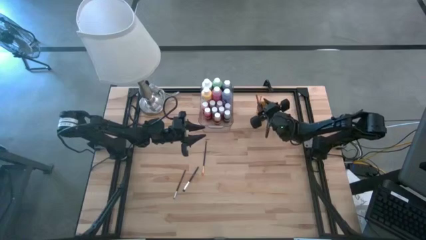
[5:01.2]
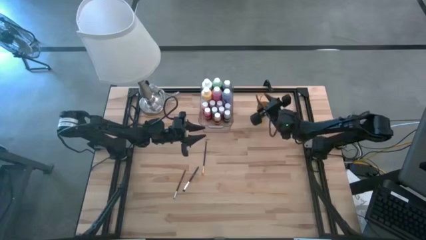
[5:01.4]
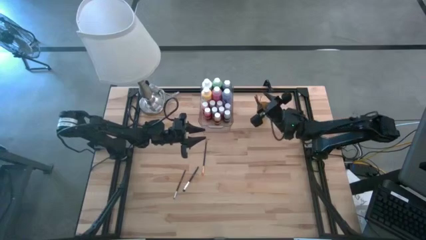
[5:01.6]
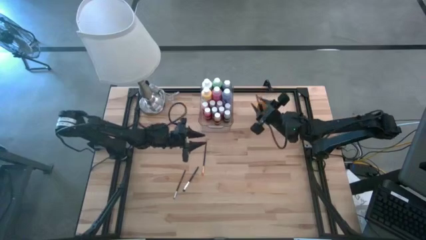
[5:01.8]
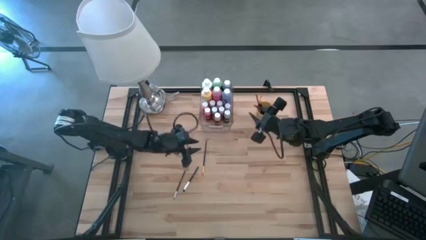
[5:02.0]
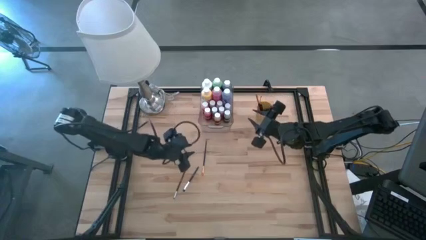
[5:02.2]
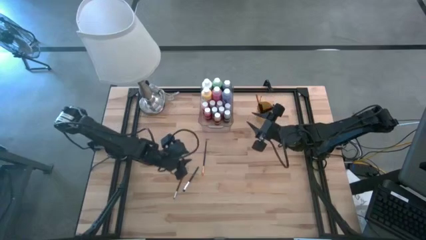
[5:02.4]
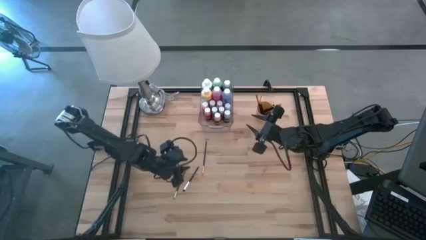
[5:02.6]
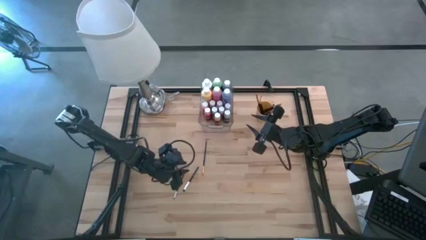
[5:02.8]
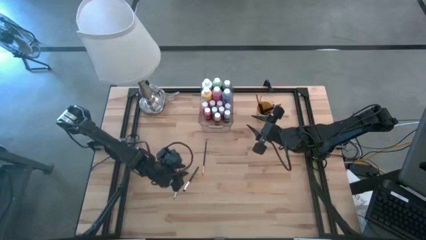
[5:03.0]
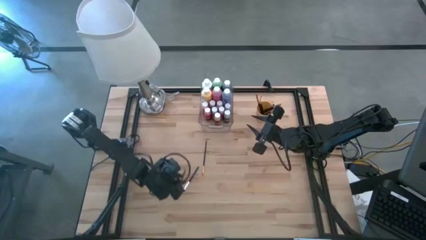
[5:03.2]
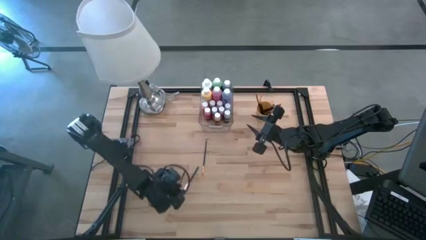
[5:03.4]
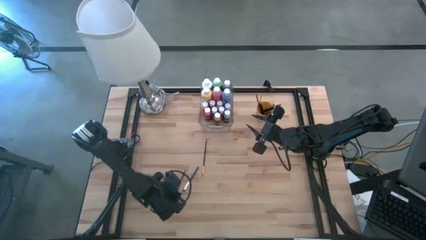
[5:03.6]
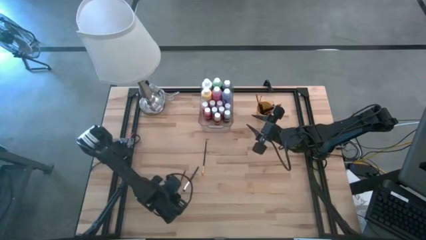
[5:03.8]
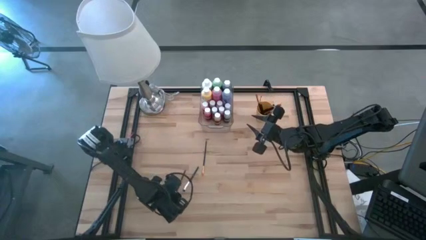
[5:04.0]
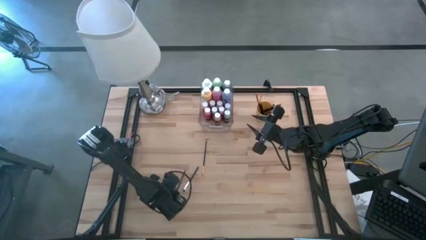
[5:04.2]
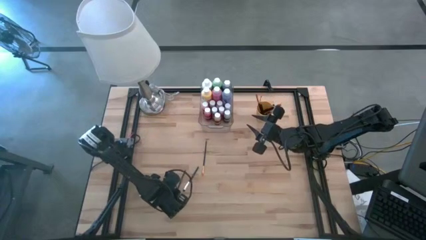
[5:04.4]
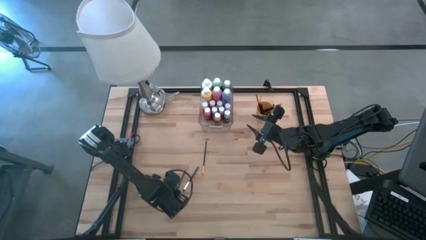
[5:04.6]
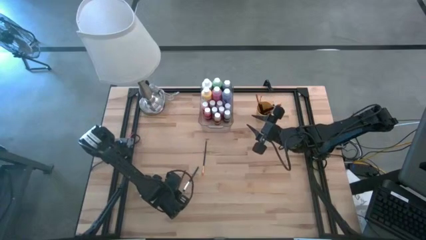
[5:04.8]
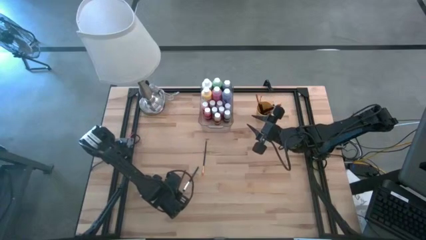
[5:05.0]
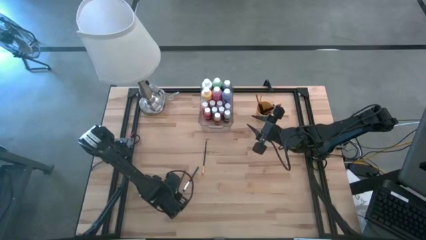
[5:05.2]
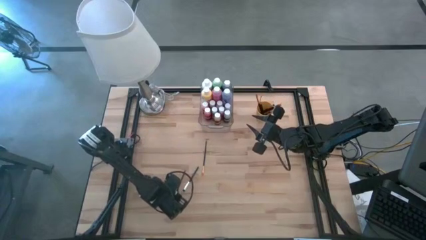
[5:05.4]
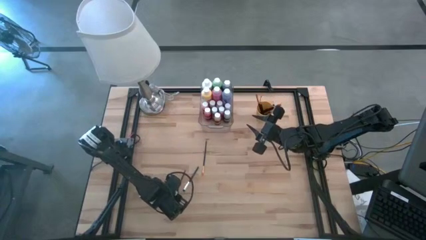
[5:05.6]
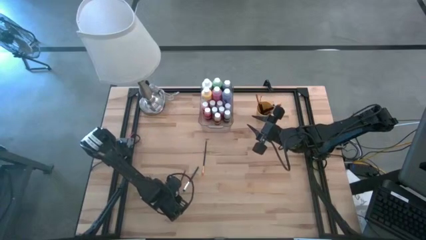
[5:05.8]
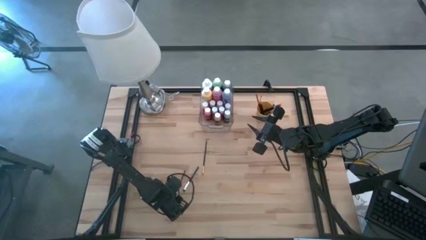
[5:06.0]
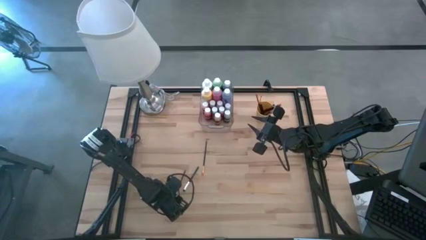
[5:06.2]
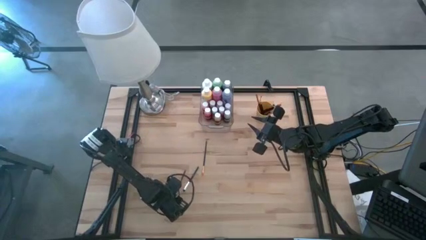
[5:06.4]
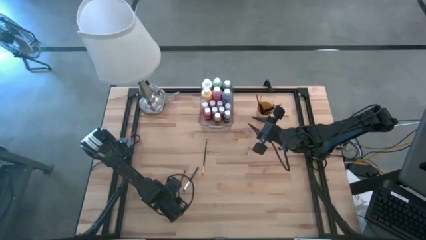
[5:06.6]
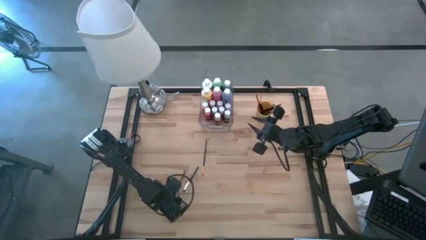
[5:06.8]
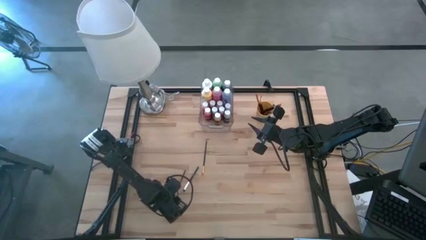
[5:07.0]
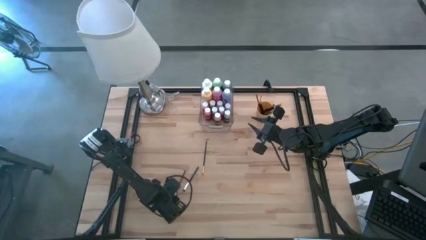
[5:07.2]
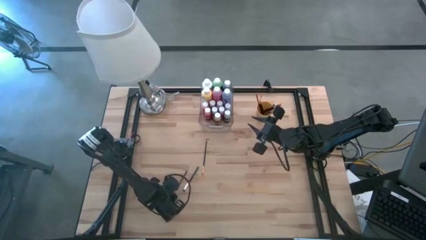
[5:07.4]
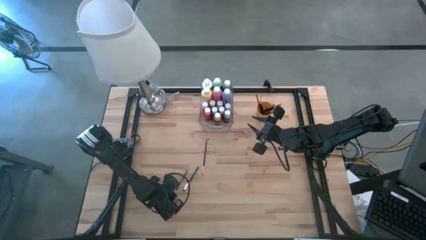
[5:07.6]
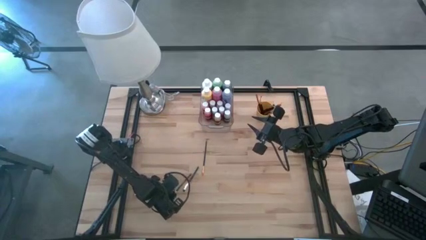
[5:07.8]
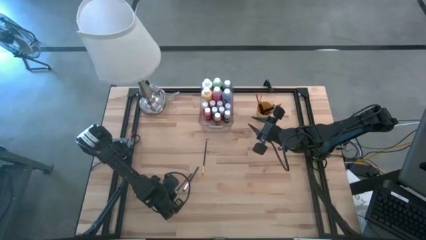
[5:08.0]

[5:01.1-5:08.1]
Task: Pick & Place Paint Supplies
Put the silver paint brush into the cup

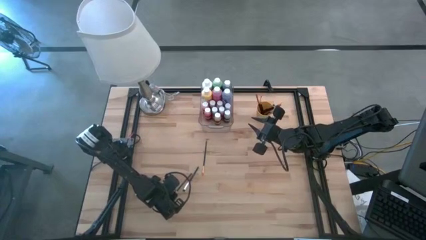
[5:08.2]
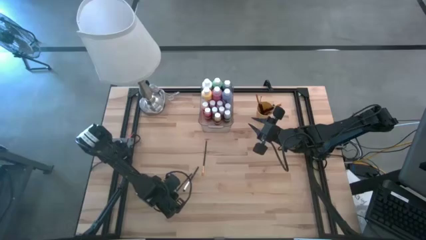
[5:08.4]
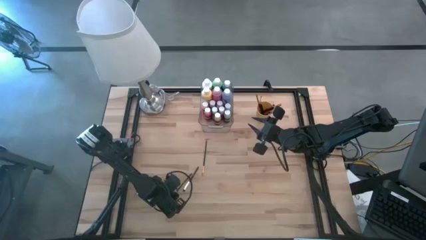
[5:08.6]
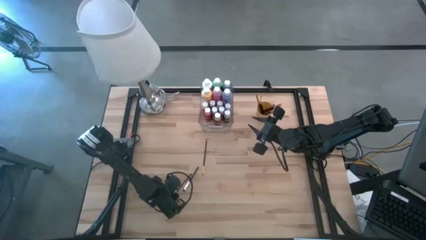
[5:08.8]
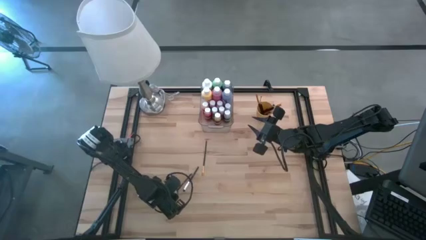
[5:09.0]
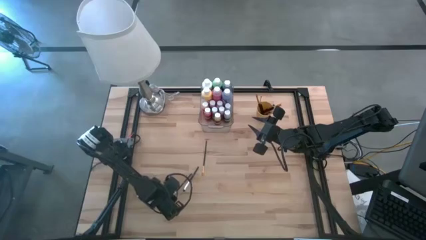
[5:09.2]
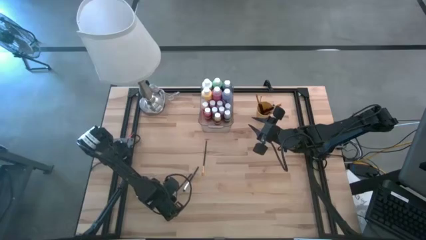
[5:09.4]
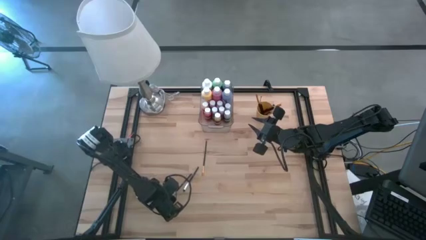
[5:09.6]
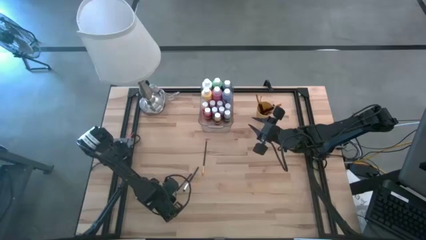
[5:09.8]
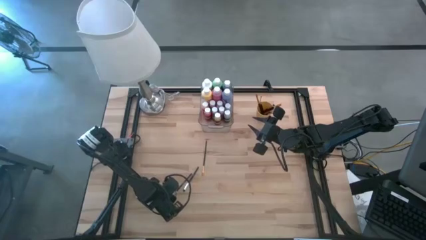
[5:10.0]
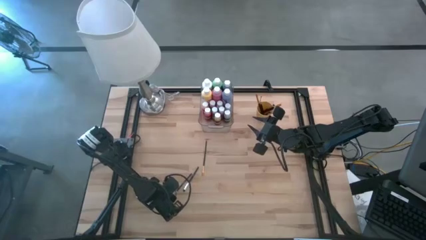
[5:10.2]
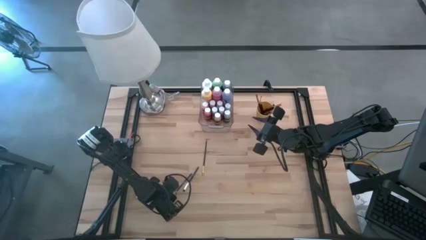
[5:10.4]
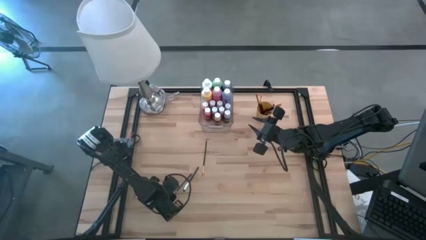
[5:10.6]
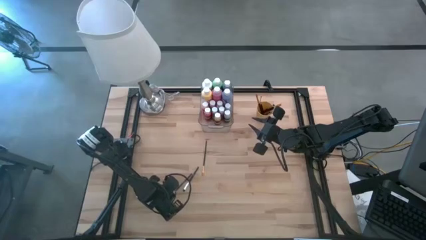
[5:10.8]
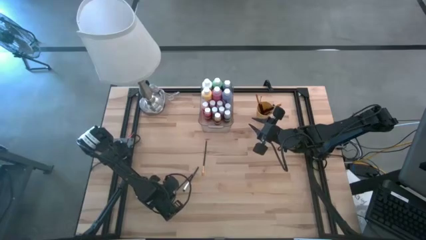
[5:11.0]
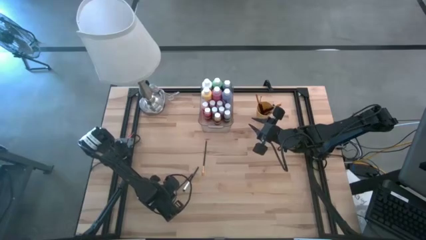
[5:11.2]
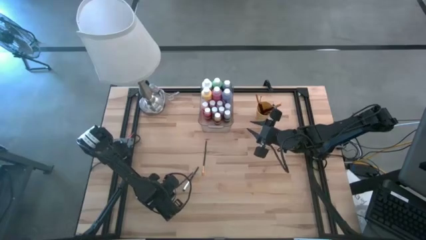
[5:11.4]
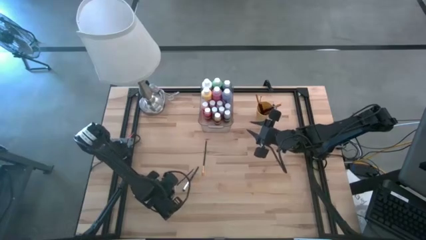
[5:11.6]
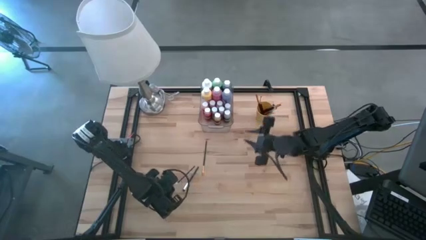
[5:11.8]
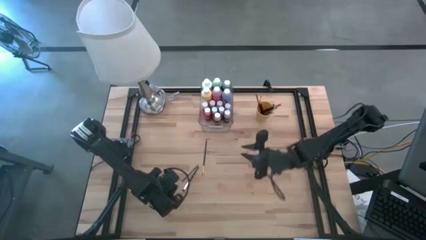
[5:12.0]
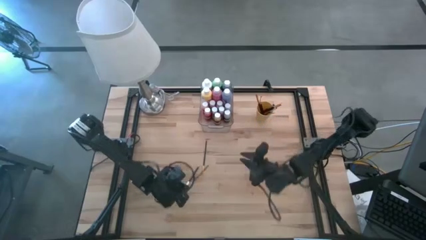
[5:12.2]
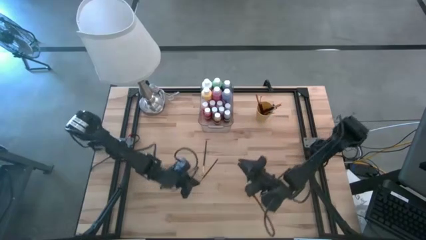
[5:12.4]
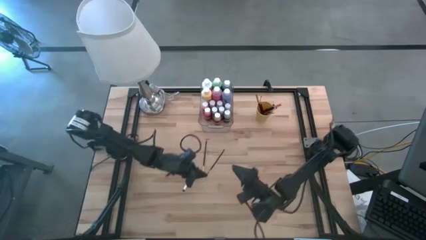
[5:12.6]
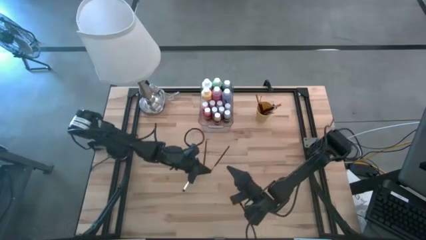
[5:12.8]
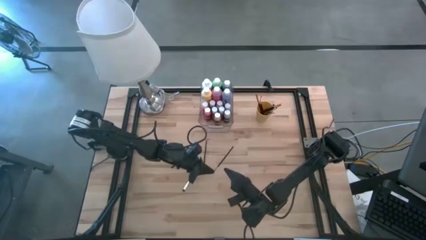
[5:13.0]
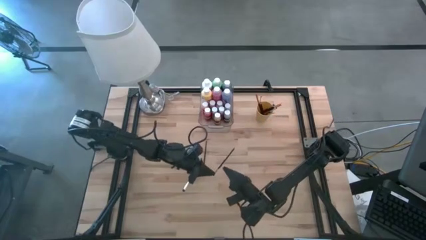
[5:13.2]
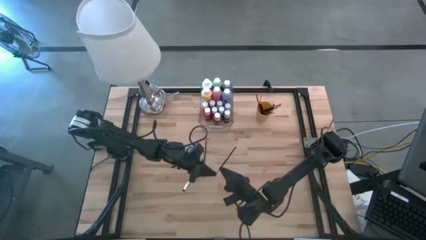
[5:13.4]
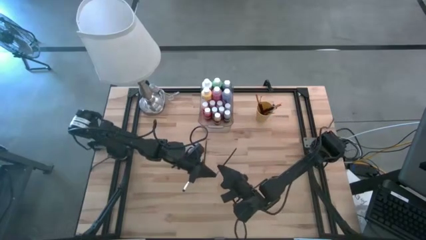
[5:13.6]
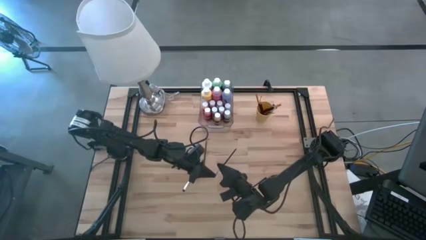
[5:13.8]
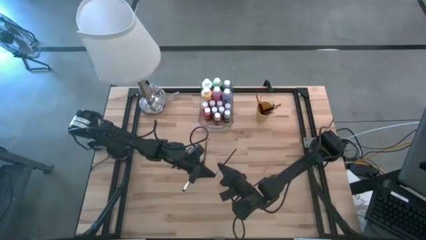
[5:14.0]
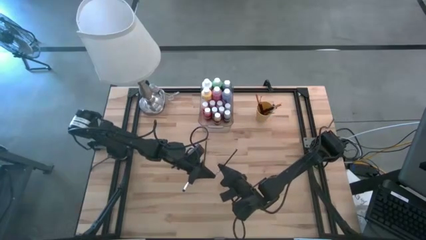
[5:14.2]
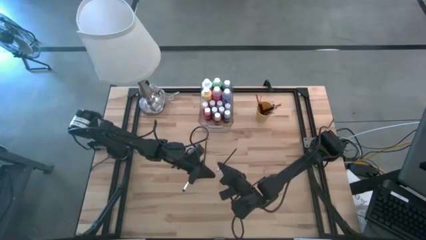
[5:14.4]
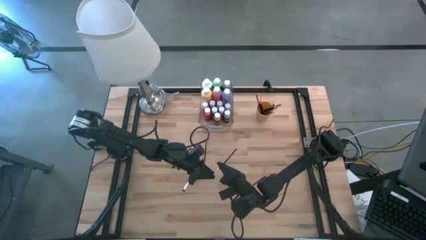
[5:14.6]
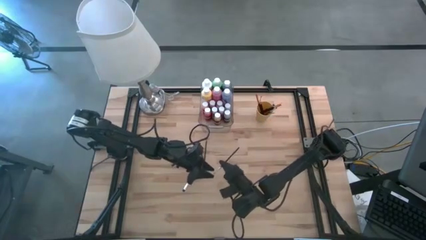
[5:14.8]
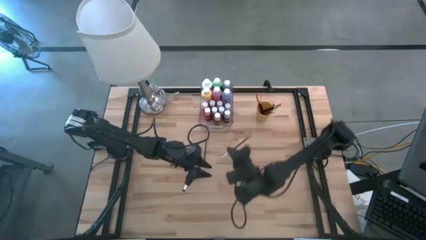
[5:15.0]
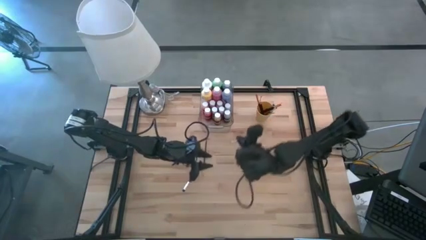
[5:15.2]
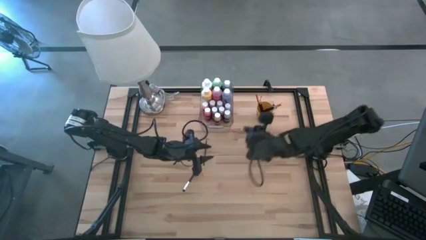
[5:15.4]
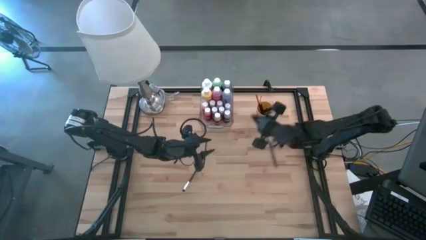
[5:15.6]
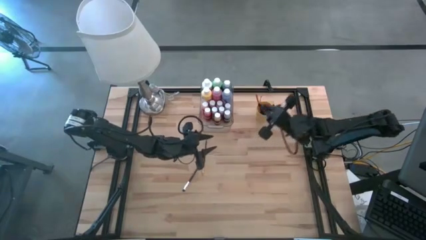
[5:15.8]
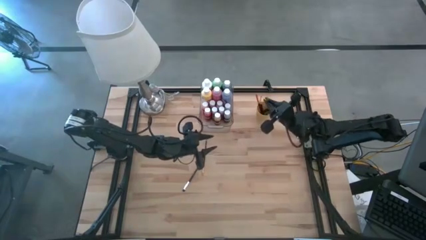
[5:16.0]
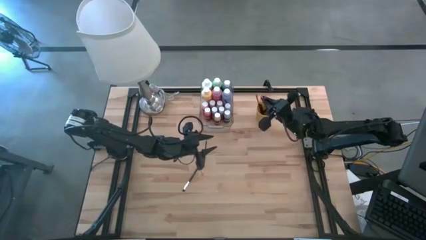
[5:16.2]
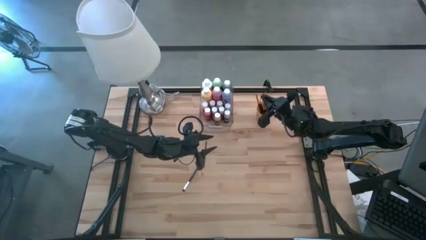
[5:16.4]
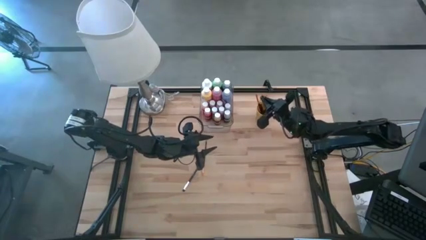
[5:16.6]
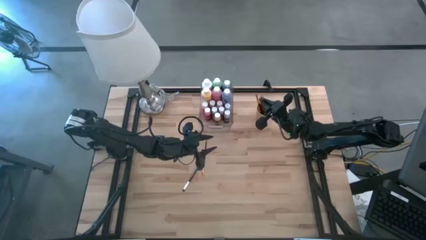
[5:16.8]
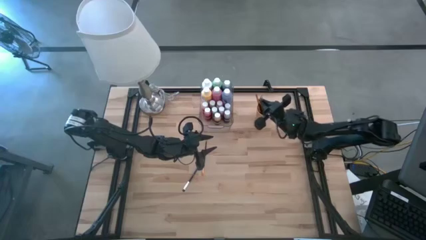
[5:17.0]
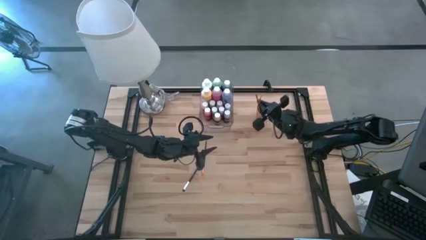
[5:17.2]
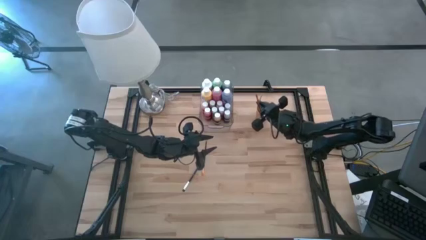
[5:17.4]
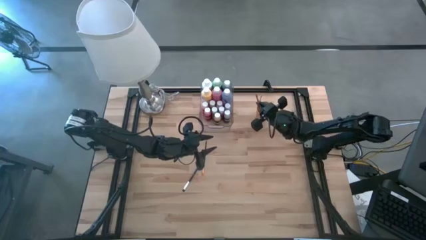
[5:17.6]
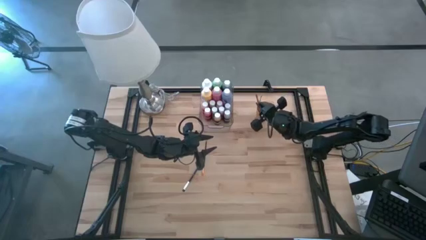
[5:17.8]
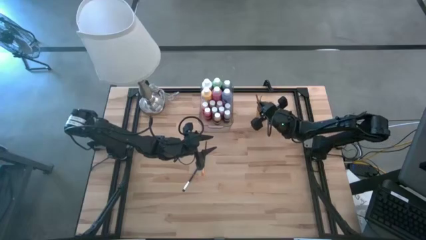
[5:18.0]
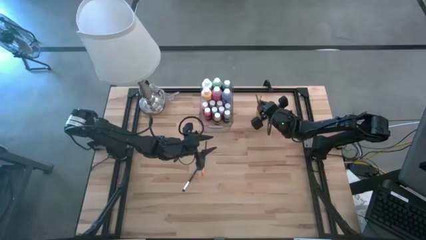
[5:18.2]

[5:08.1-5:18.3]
Put the silver paint brush into the cup
